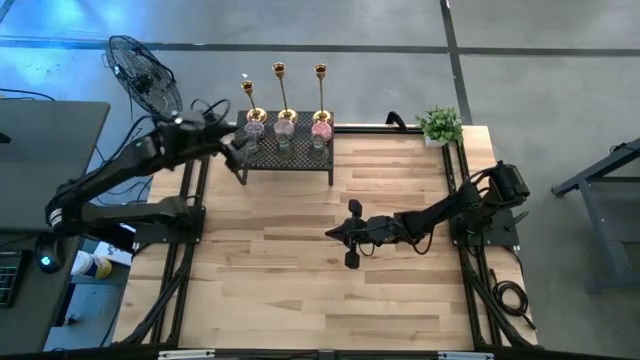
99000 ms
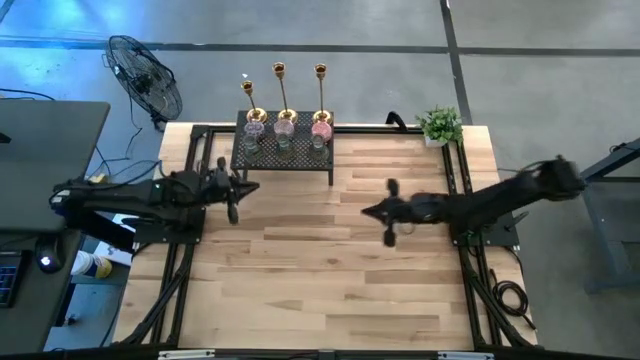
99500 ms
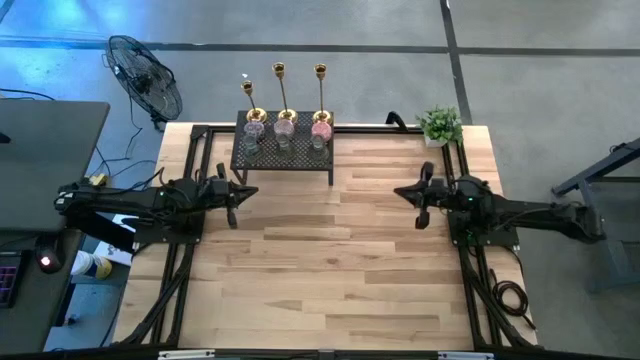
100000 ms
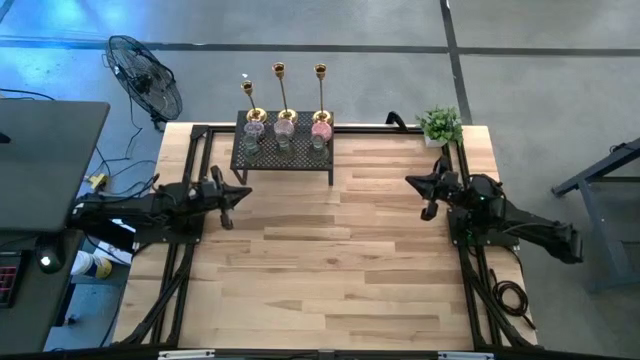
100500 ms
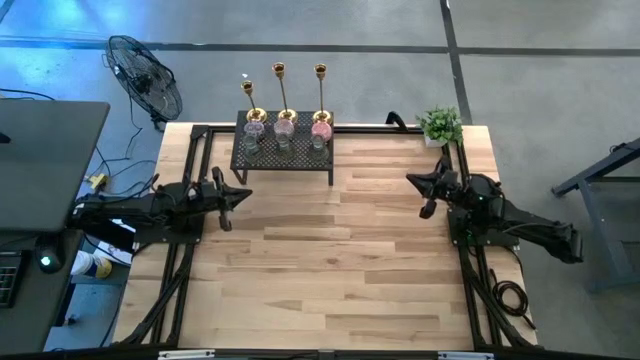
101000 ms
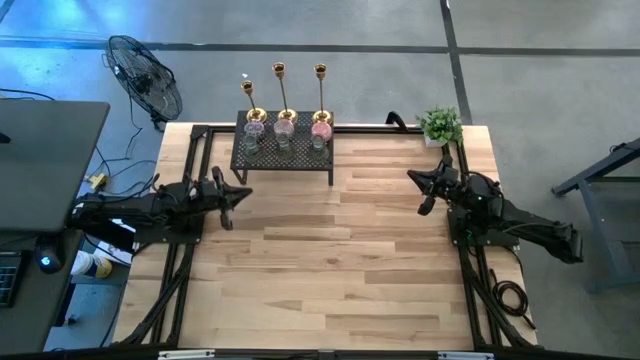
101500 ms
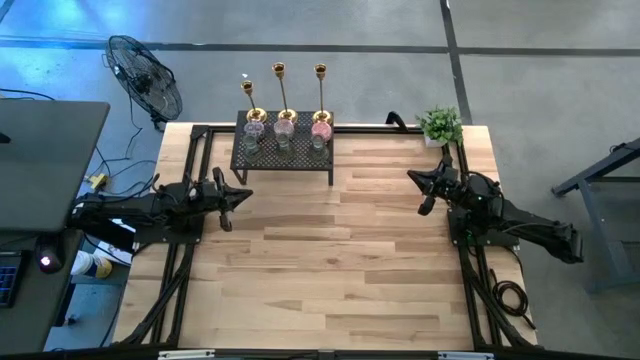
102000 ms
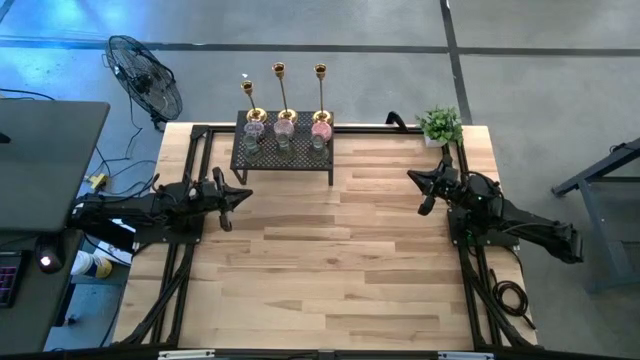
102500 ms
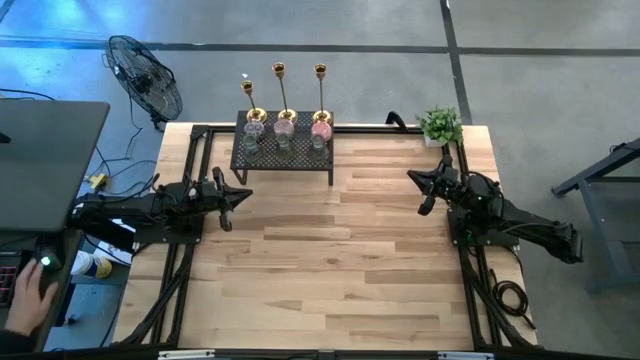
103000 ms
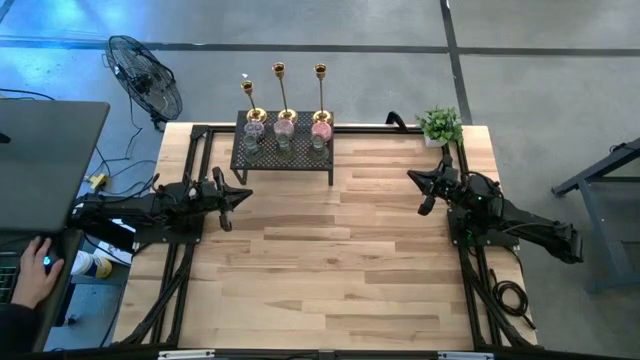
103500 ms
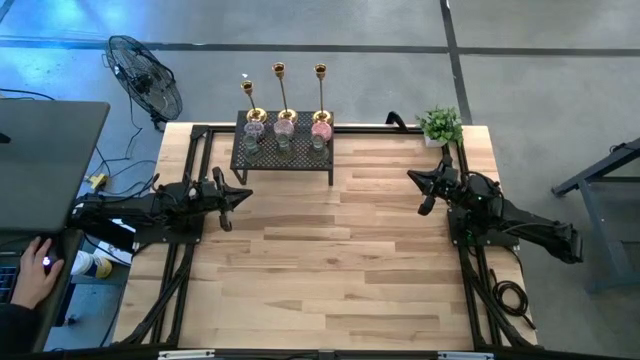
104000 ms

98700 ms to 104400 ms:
Task: Pick & Place candle stick holders
Return to Home Position

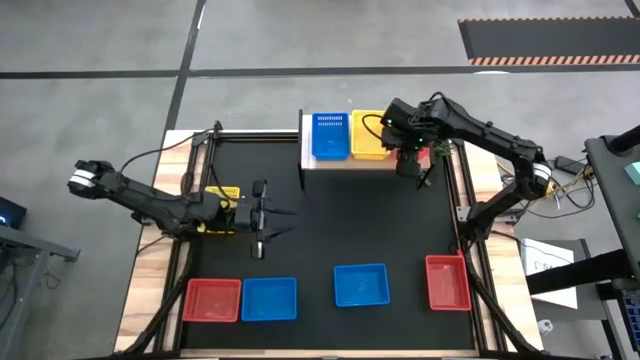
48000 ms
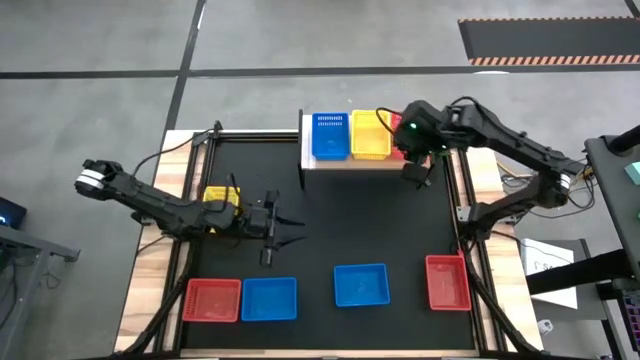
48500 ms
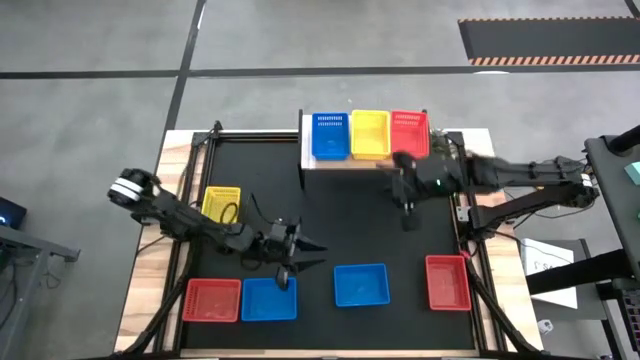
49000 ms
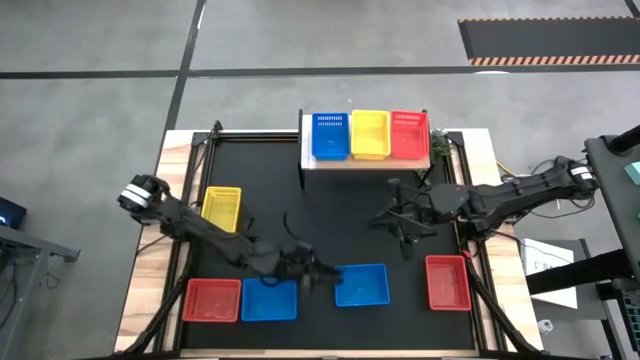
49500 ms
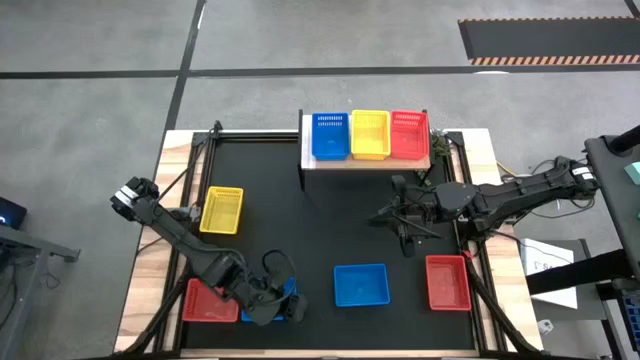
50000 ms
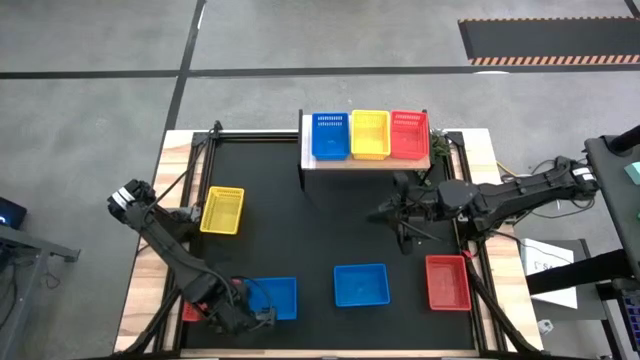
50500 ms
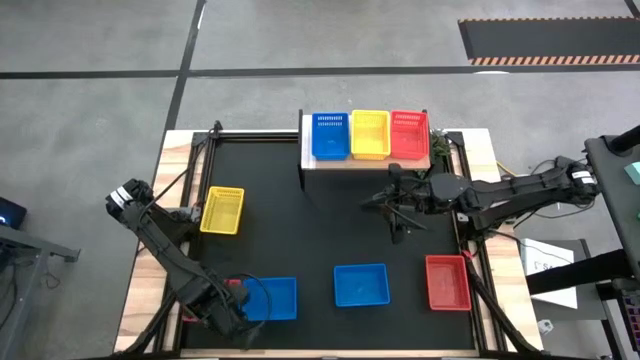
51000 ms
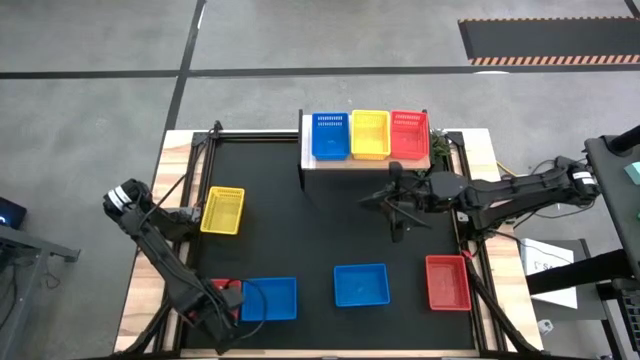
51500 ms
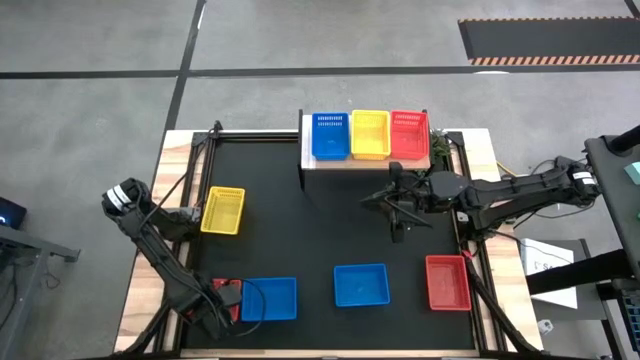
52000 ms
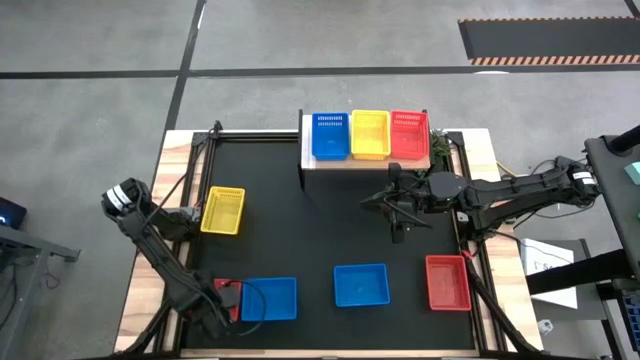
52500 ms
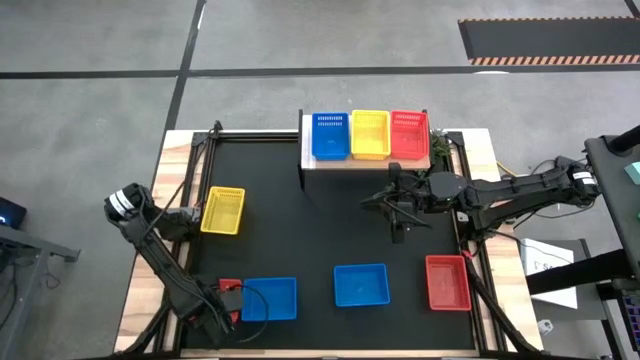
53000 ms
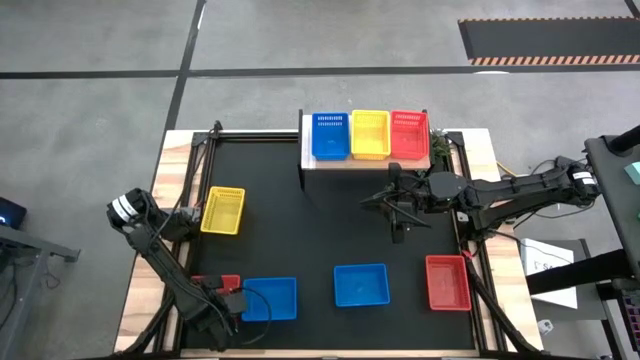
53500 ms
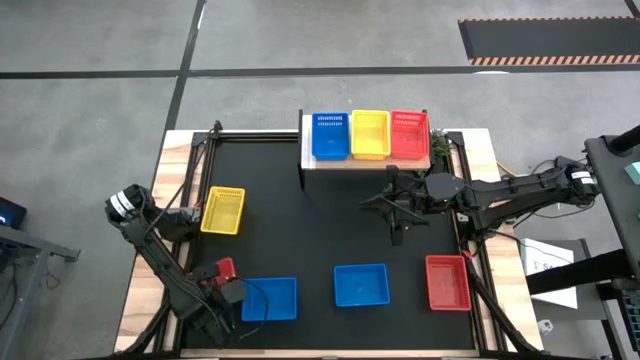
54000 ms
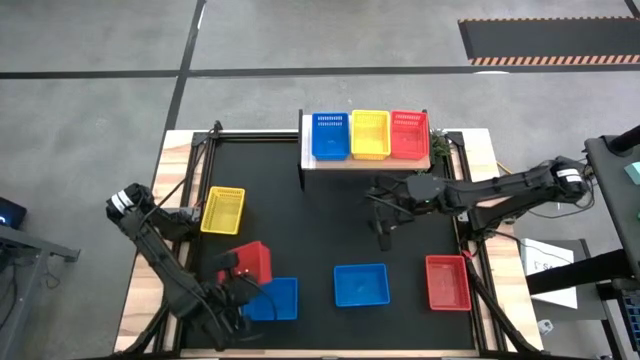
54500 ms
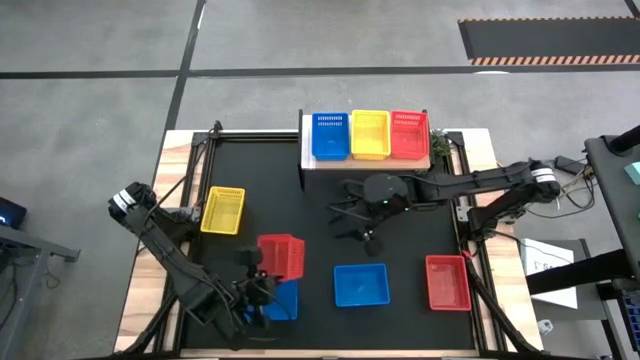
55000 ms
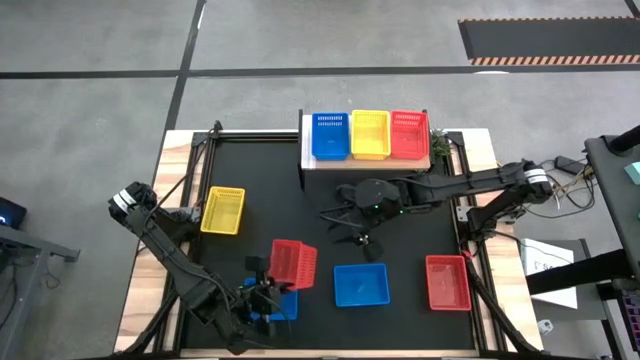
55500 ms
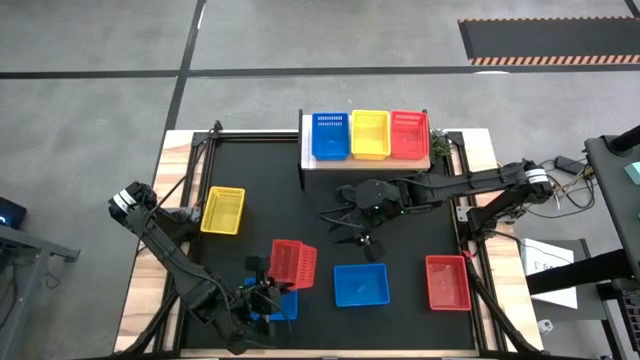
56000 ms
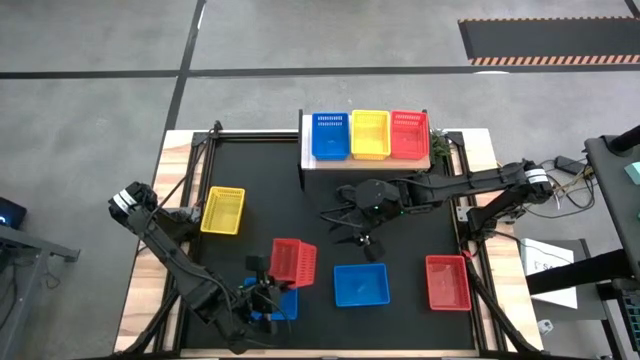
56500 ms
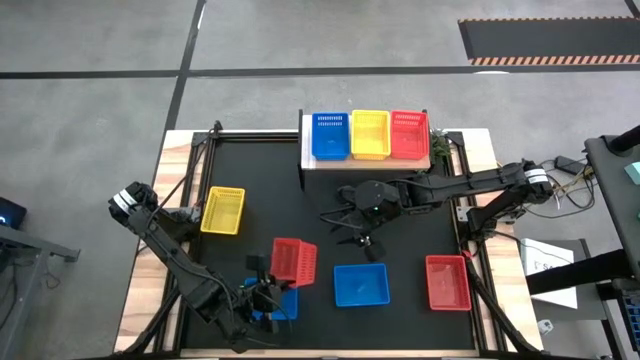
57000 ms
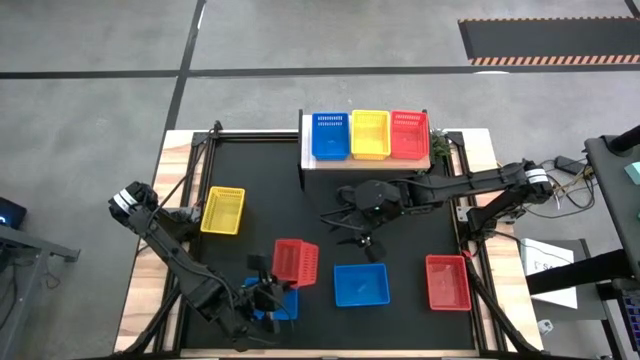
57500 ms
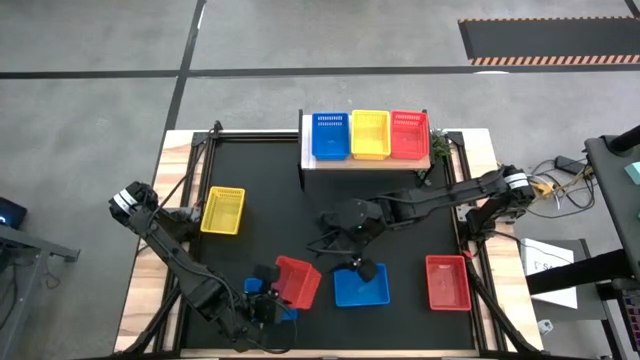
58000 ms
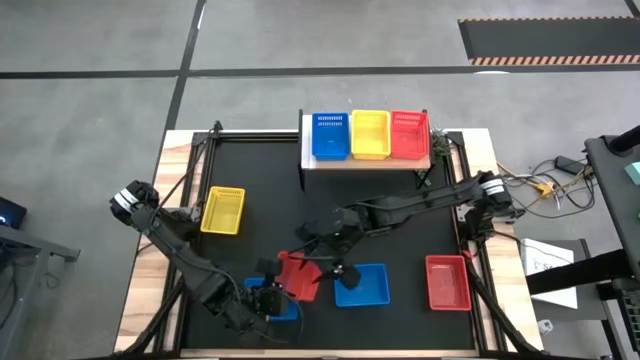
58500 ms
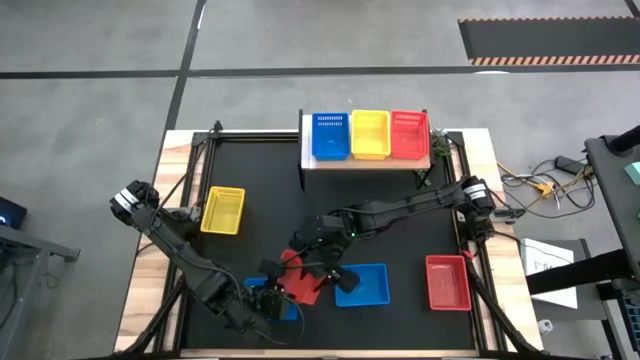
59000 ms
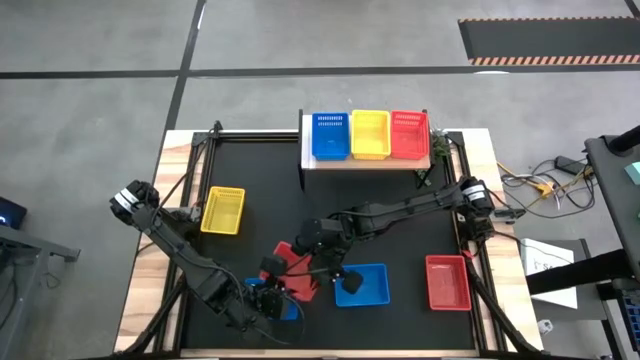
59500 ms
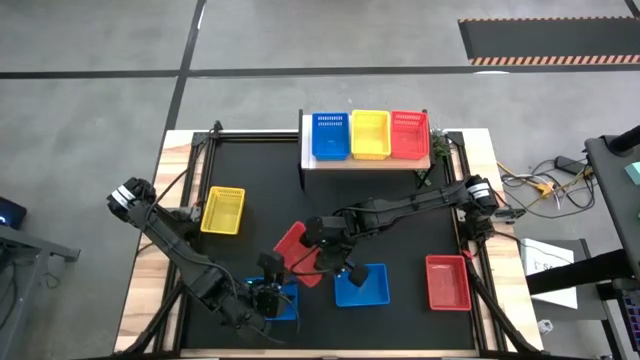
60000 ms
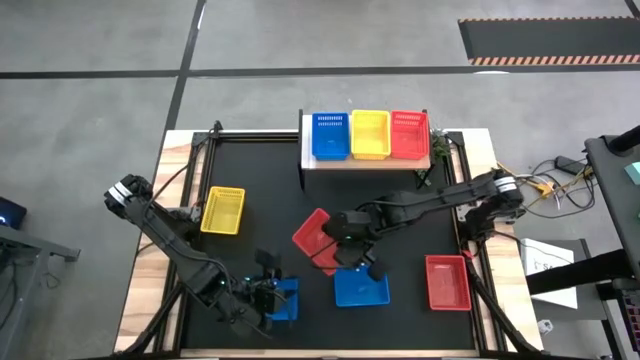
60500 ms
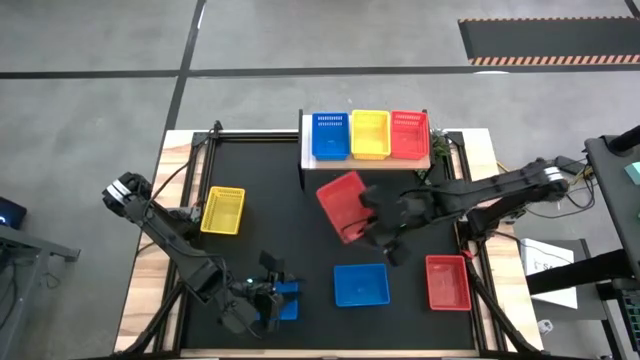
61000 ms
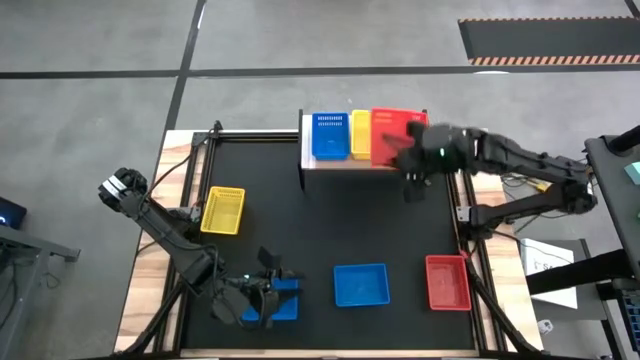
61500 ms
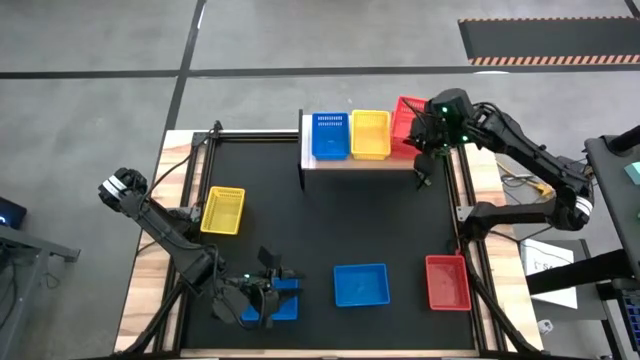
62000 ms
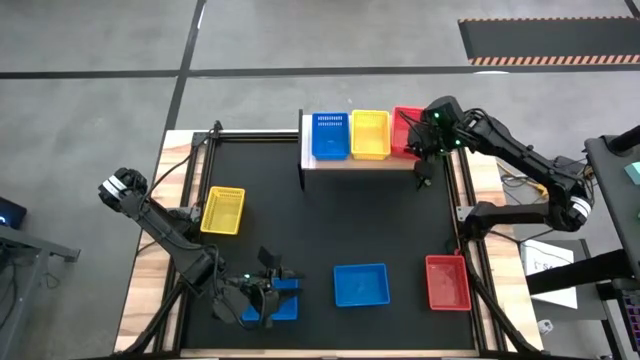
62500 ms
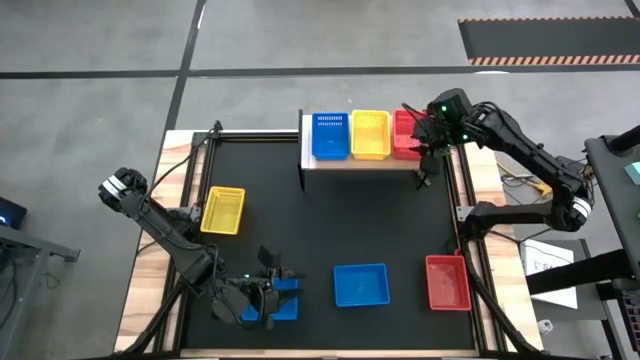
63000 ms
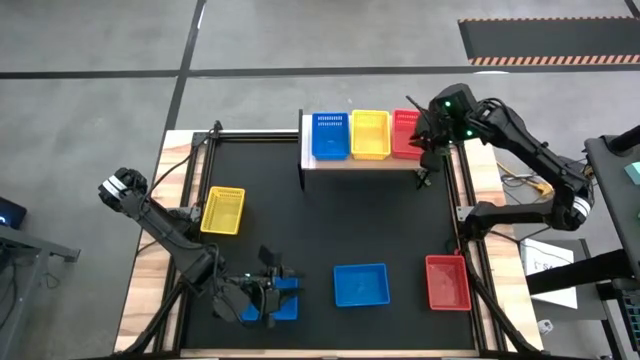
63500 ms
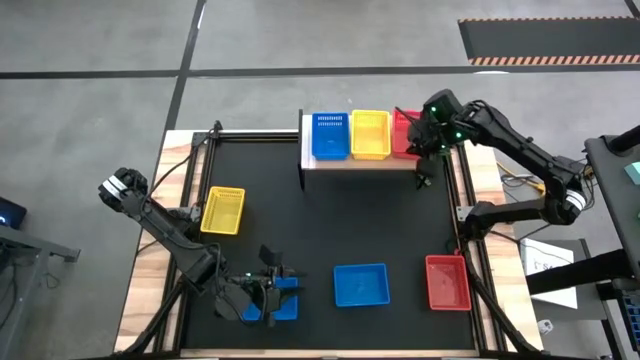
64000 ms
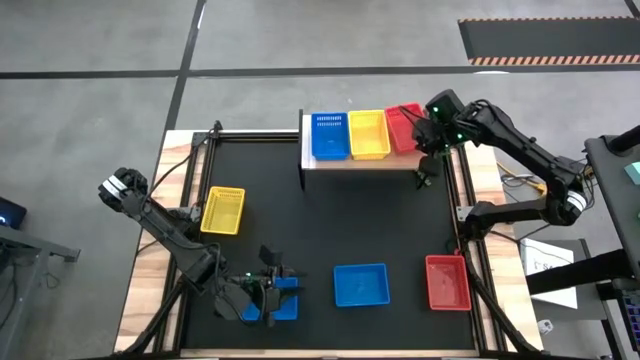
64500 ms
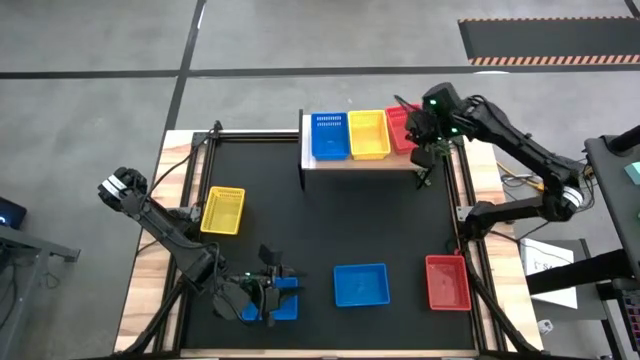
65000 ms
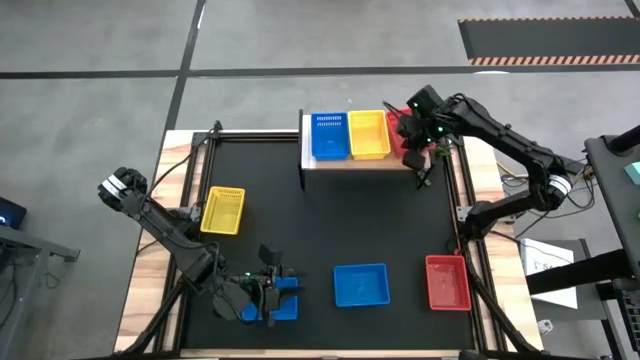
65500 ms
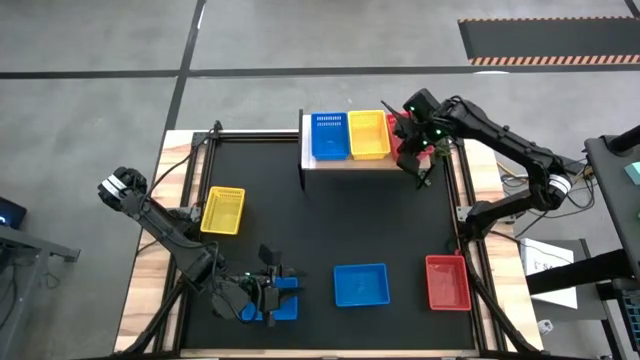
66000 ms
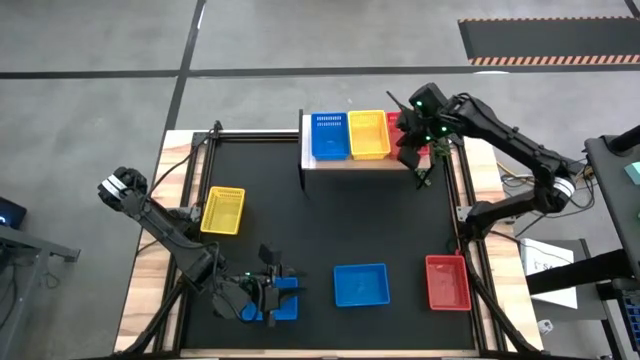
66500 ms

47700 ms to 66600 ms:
Task: Stack baskets on shelf by color
Stack the left red bin on top of the red bin on the shelf
